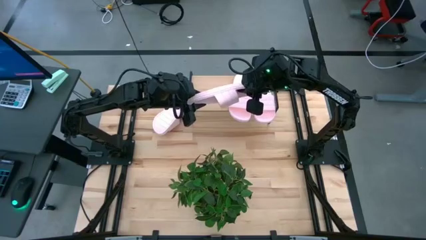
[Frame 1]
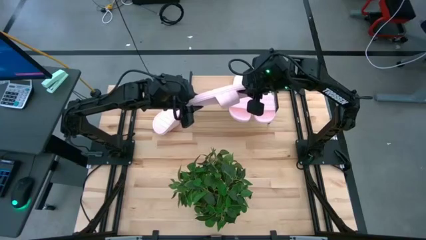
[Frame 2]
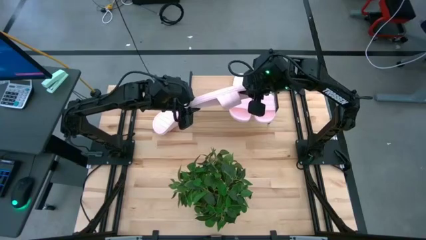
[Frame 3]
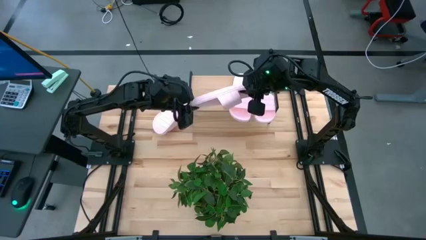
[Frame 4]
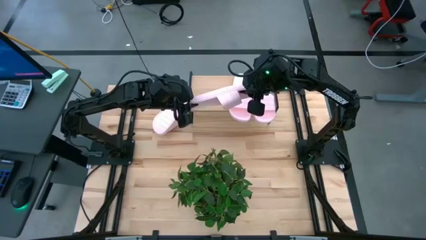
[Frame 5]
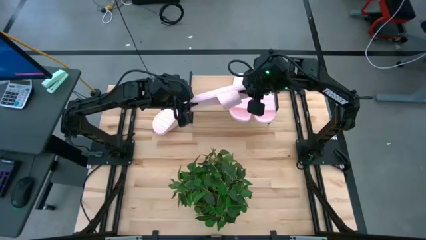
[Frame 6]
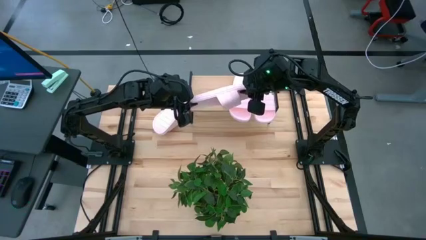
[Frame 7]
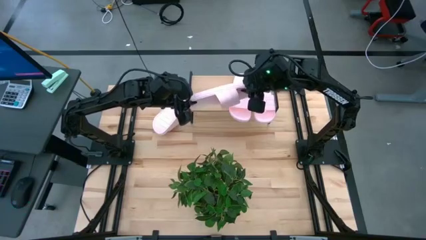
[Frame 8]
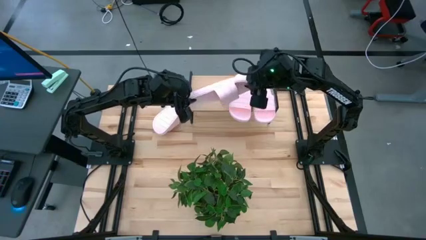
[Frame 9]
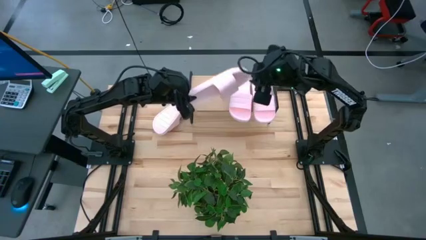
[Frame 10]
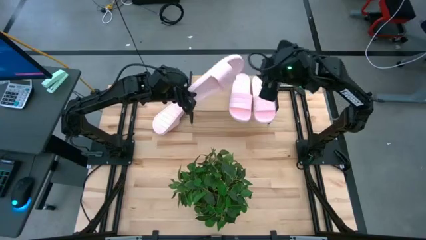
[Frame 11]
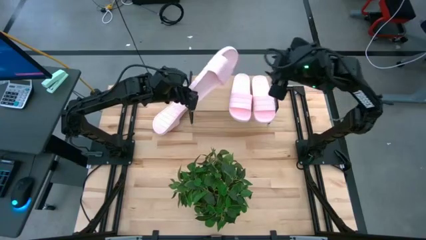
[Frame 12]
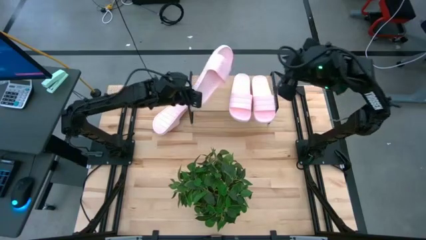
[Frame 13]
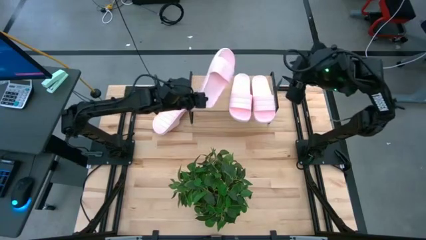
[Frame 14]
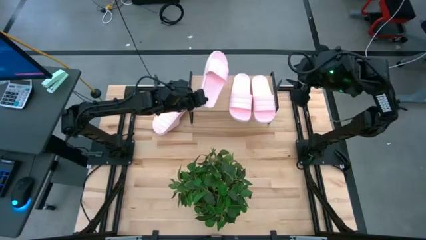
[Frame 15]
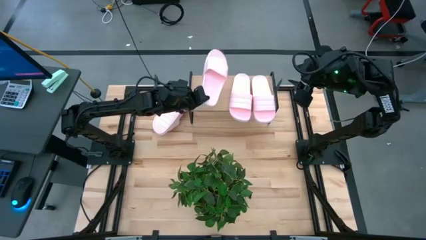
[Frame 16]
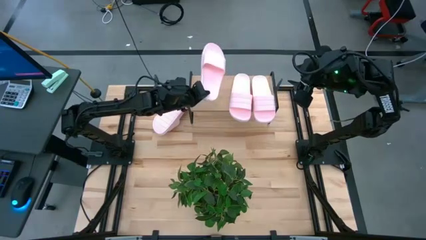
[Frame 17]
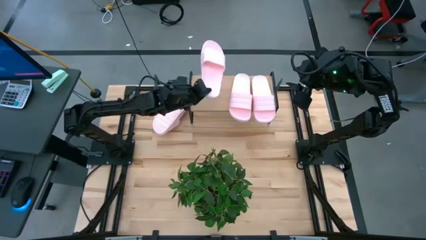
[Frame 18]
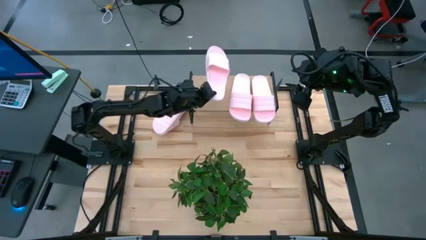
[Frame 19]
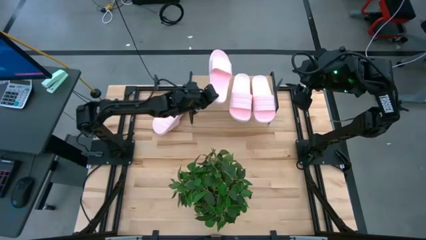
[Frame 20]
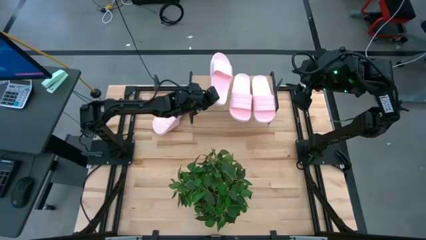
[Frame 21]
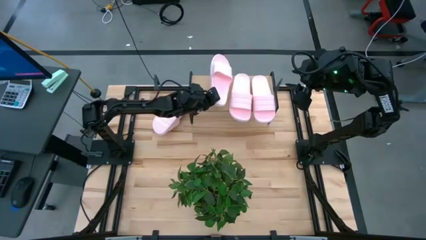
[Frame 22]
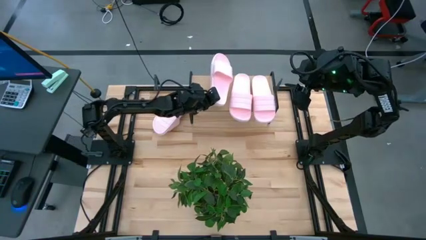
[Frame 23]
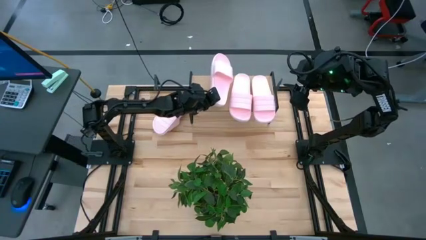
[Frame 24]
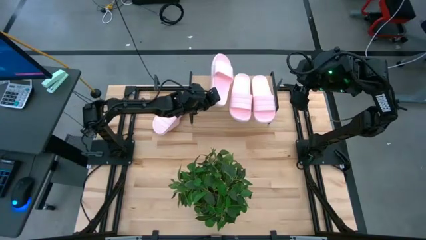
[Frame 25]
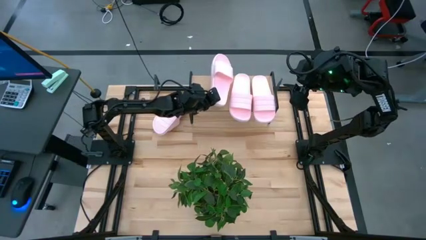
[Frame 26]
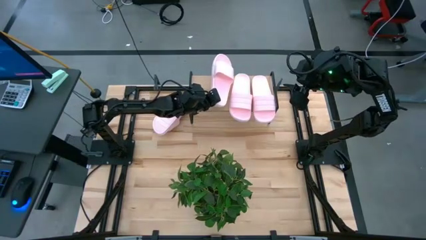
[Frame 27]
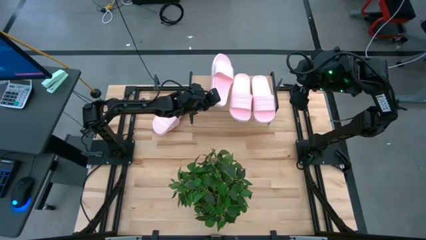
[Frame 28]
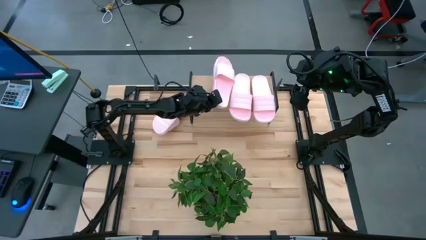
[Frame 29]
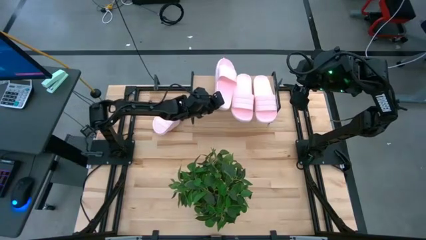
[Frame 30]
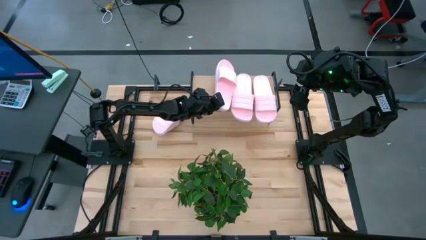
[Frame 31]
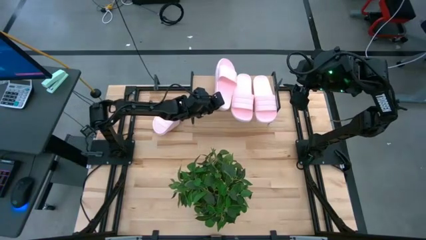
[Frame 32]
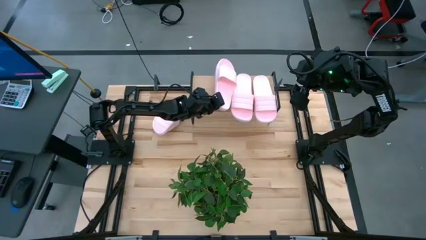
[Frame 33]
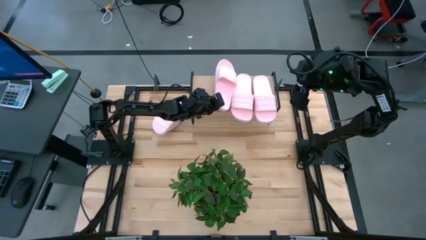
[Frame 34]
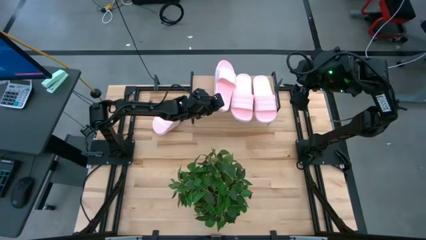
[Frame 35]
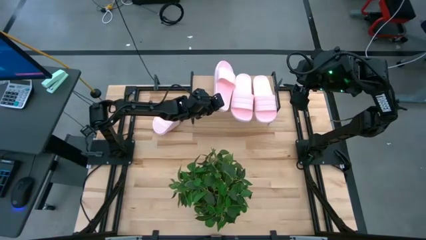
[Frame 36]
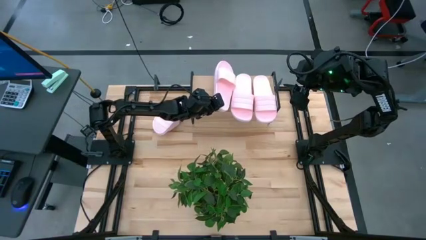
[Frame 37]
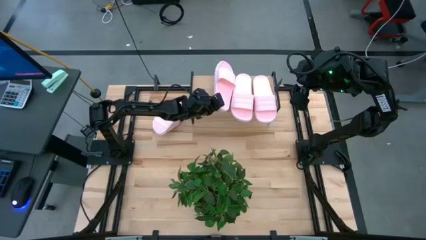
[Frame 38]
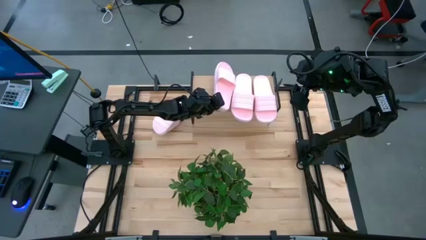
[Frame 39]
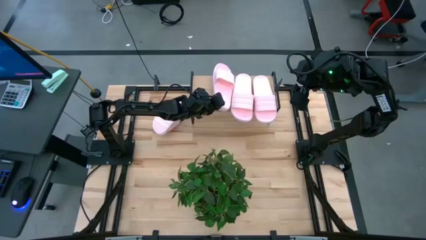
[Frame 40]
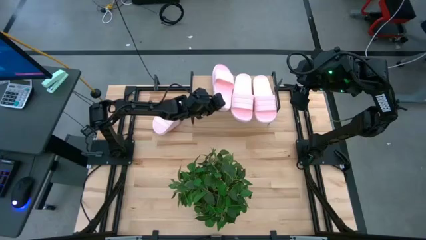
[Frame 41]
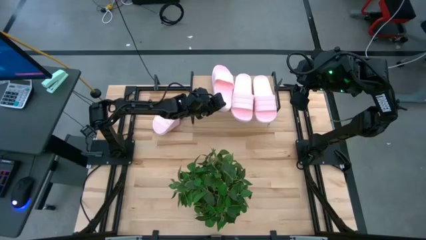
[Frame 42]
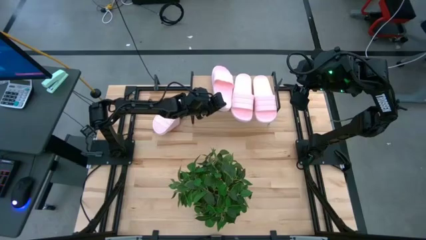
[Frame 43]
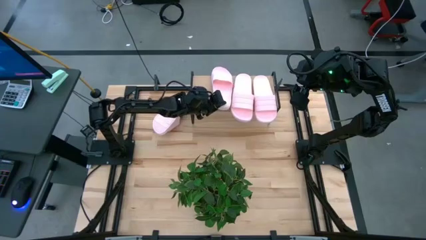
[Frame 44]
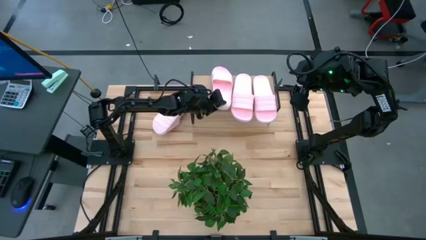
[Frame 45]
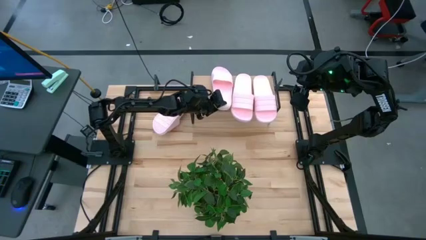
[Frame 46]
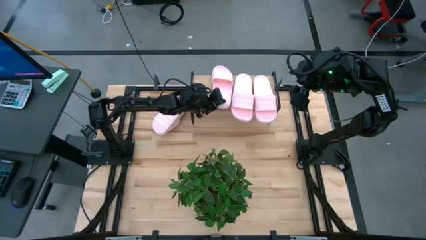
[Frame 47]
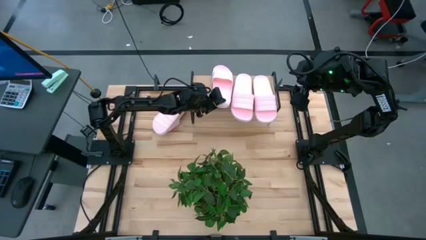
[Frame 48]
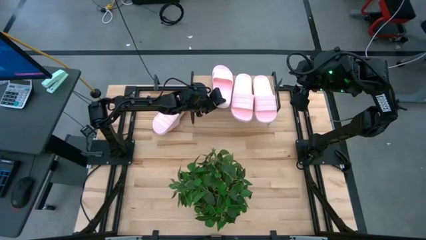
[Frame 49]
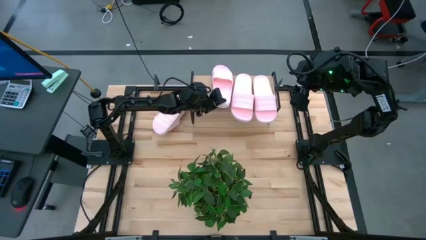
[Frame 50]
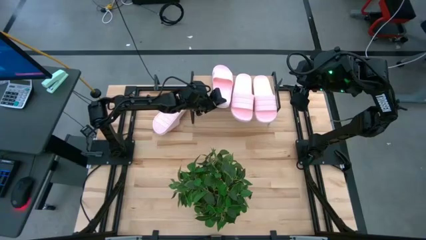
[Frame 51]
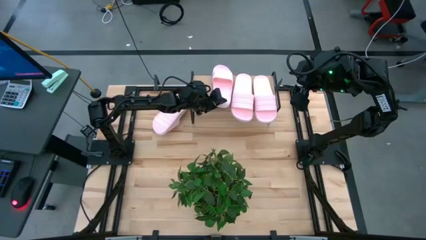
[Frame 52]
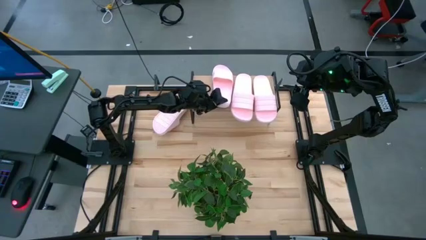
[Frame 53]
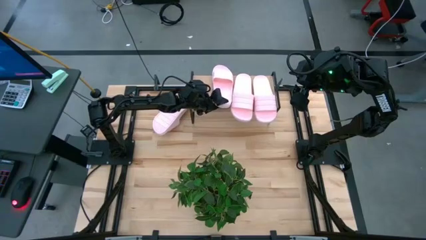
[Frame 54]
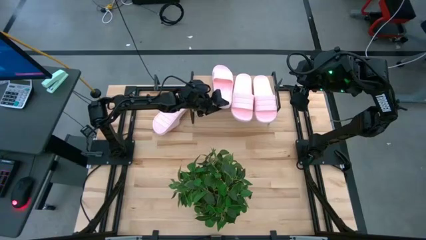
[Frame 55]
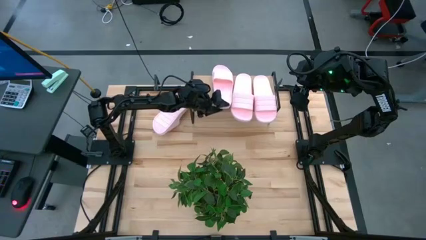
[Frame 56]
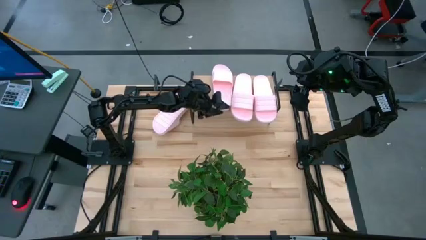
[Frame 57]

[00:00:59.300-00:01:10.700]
Task: Pick and place slides into the shelf
Put the bottom slide on the shelf

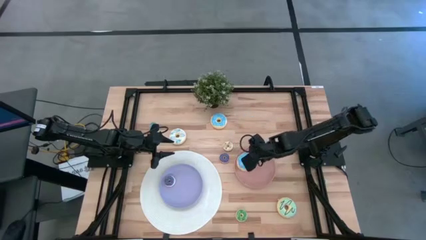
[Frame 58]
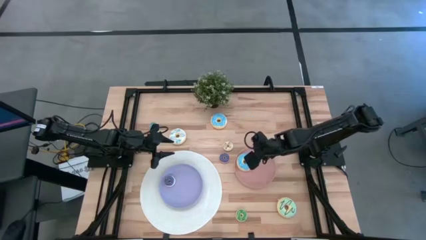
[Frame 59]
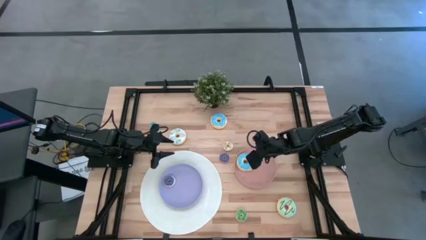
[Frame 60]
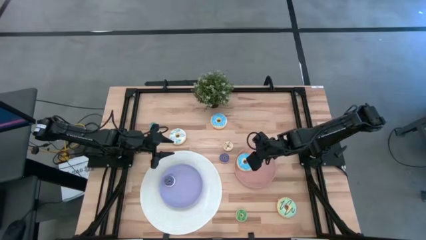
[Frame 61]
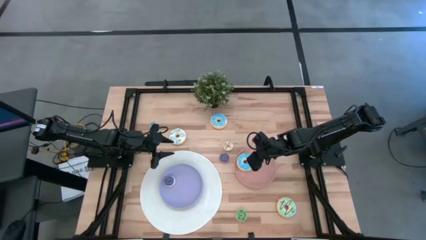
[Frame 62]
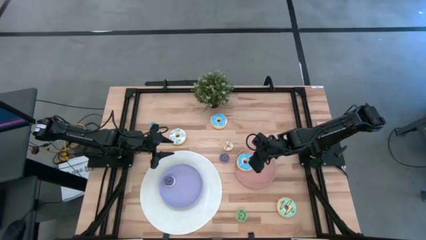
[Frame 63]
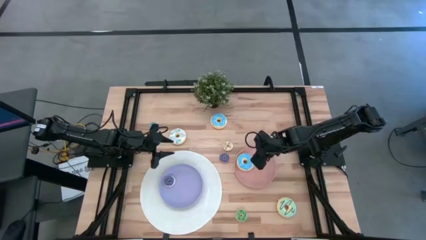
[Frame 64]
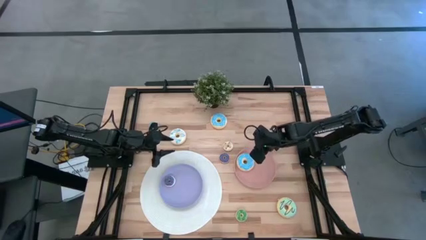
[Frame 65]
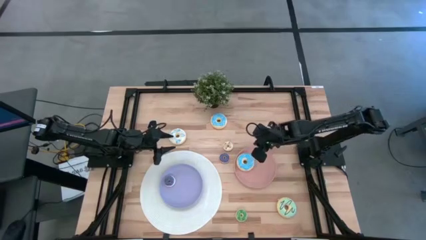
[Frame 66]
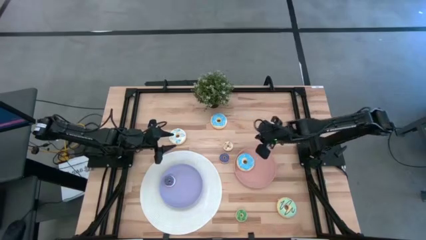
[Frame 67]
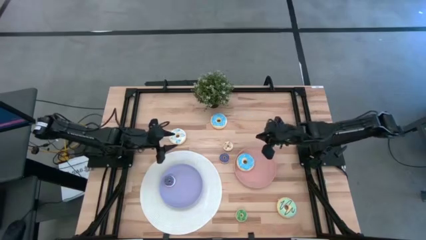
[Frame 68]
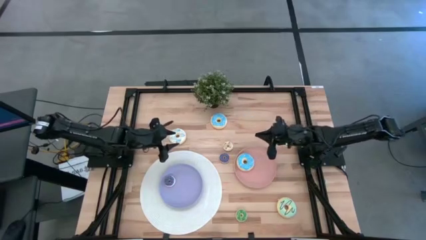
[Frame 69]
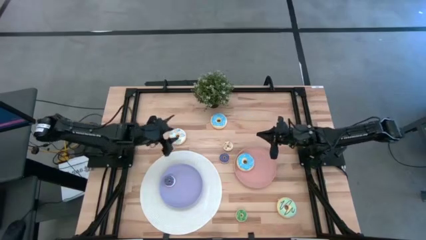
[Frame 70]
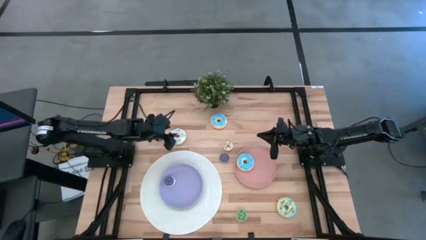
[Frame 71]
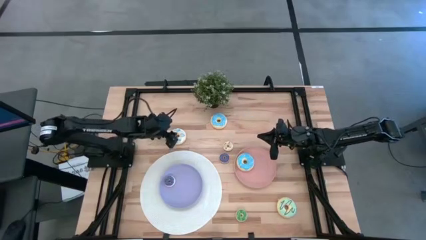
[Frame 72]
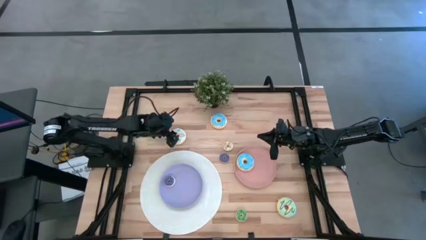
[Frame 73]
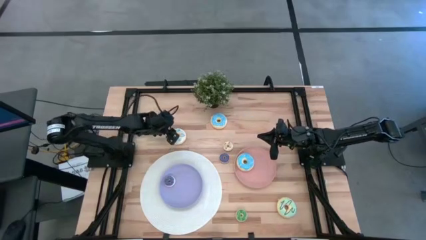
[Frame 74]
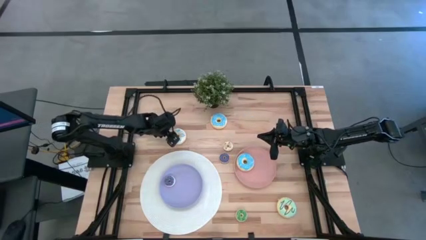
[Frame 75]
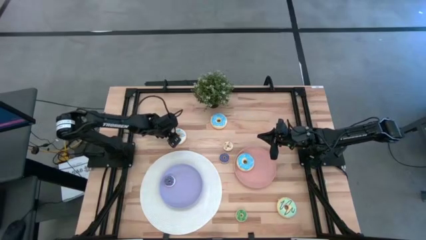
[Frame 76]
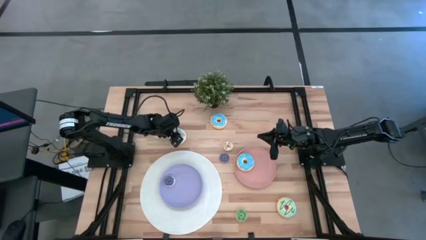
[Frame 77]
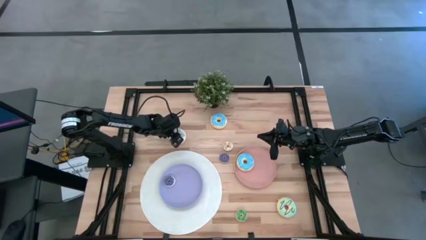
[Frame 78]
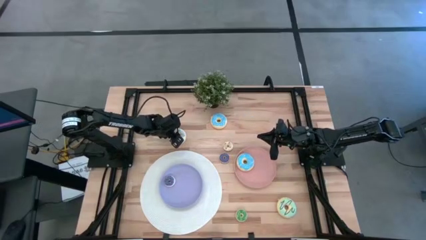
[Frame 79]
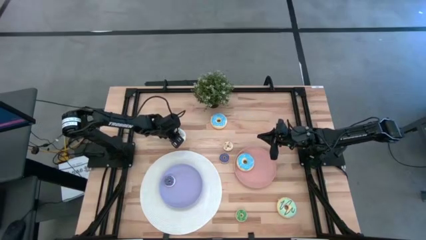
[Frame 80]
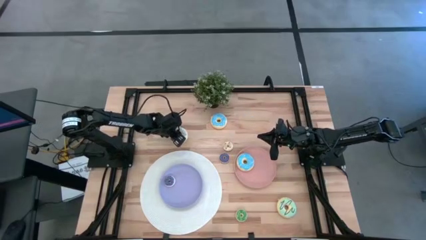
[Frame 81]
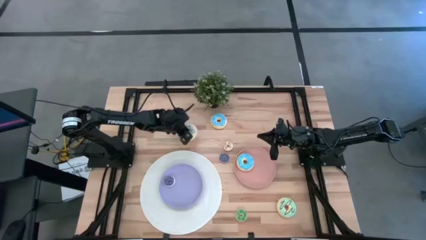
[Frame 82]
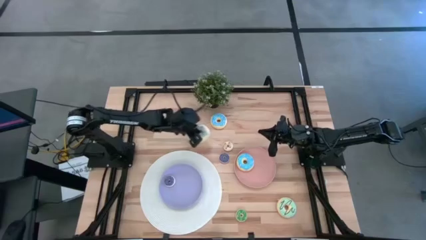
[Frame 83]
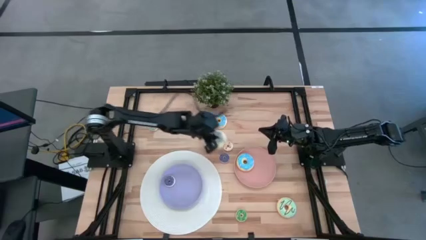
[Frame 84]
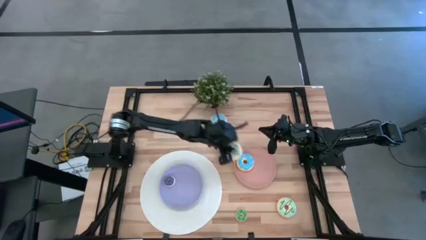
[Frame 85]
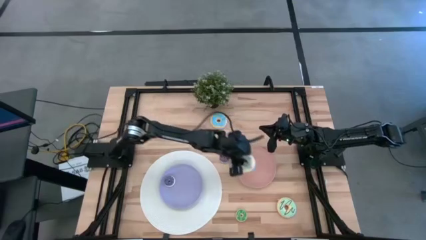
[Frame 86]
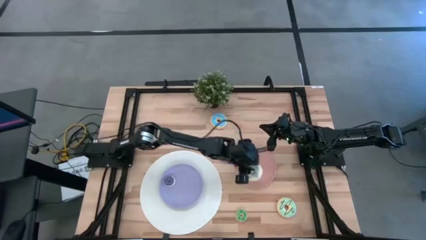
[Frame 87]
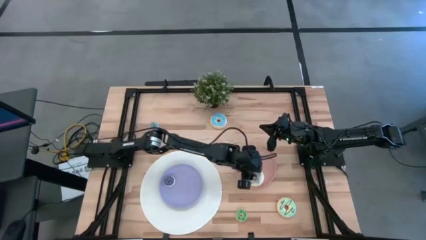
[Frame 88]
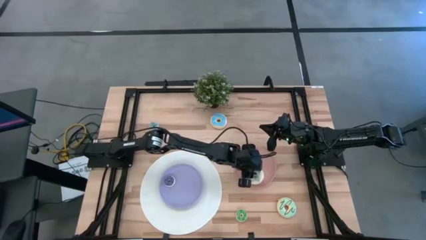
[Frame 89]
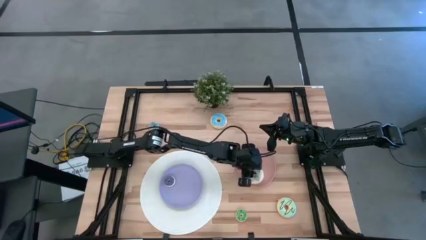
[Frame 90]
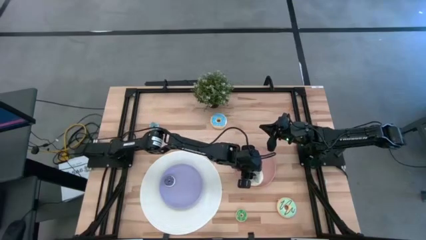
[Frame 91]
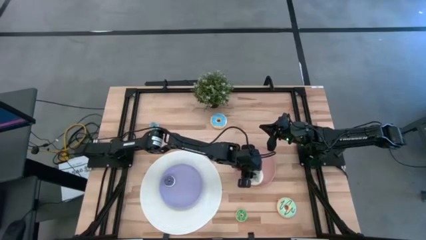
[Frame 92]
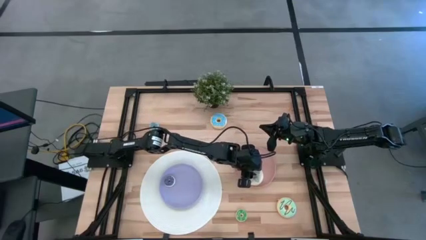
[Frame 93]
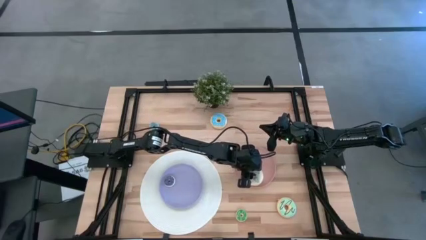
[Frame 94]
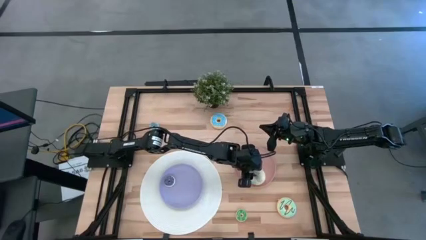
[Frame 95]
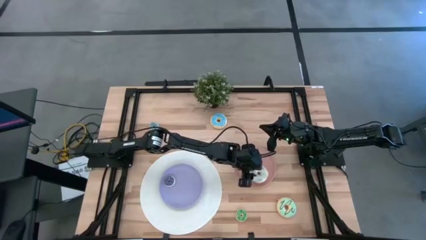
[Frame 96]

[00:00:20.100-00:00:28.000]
Task: Pick & Place donuts
Put the big white donut on the pink plate
